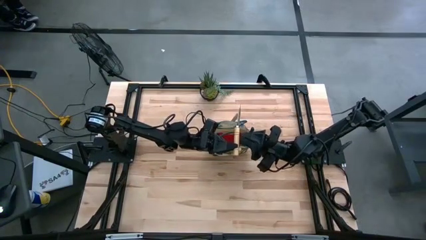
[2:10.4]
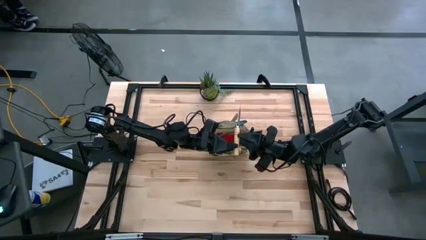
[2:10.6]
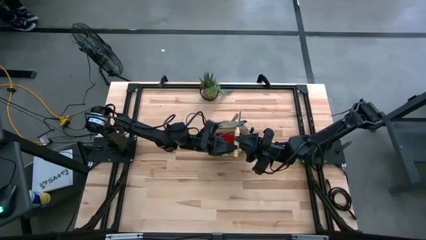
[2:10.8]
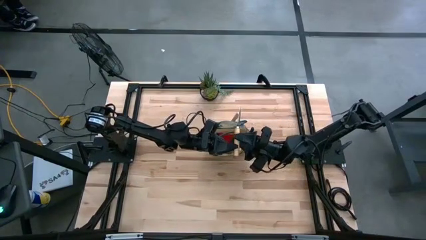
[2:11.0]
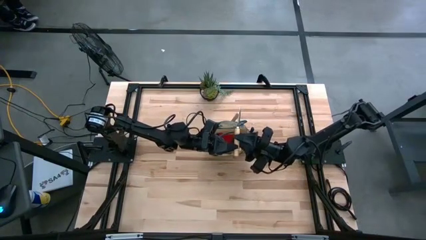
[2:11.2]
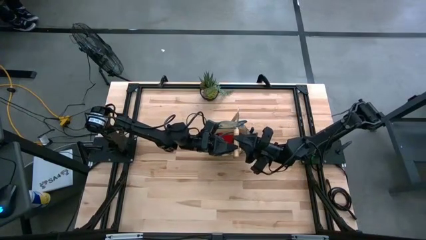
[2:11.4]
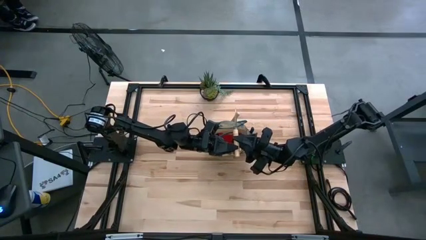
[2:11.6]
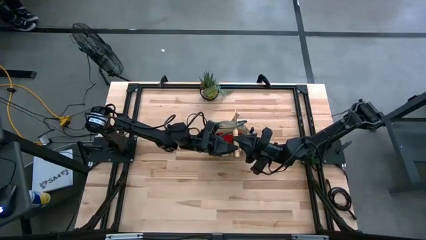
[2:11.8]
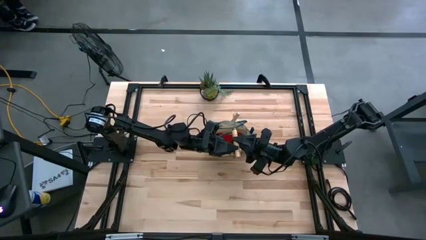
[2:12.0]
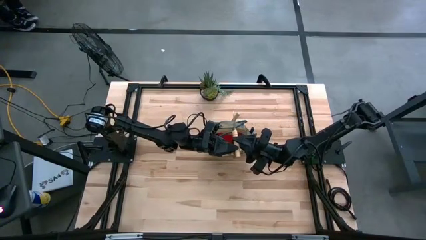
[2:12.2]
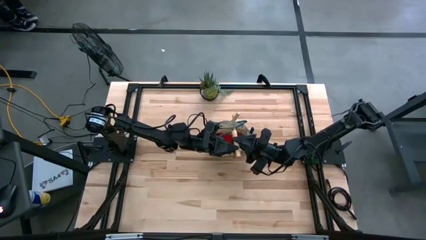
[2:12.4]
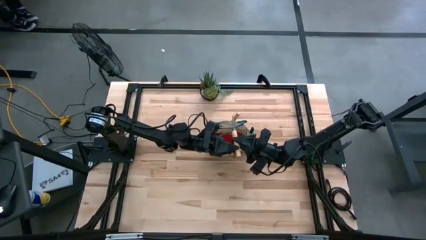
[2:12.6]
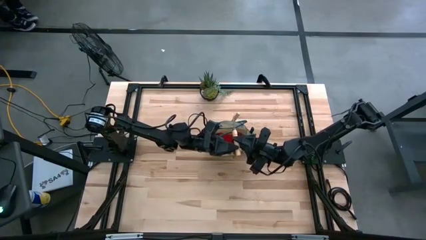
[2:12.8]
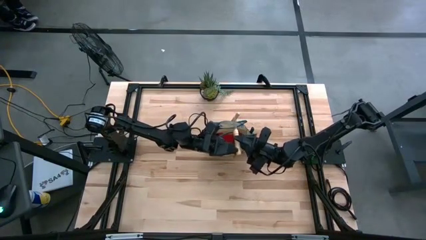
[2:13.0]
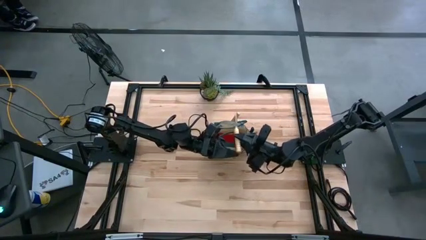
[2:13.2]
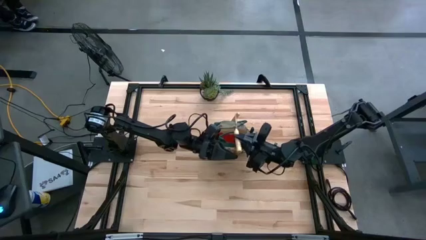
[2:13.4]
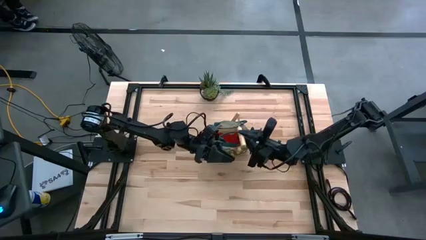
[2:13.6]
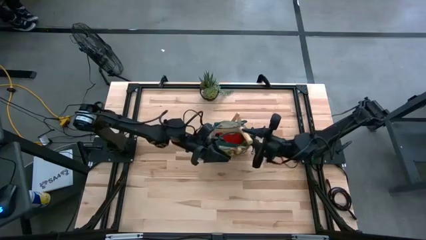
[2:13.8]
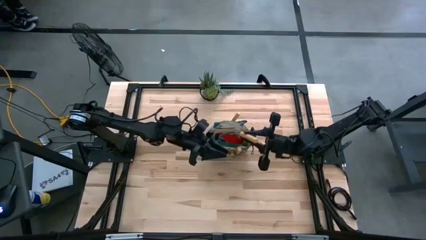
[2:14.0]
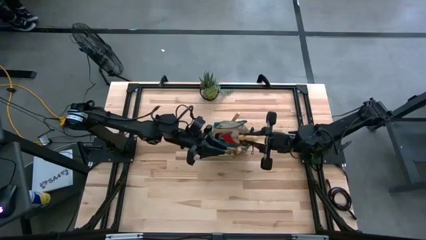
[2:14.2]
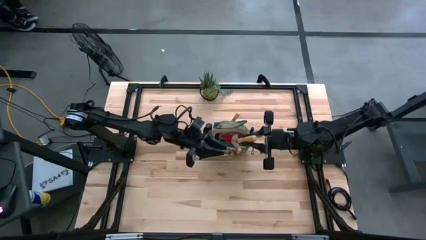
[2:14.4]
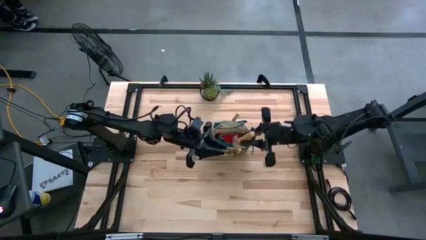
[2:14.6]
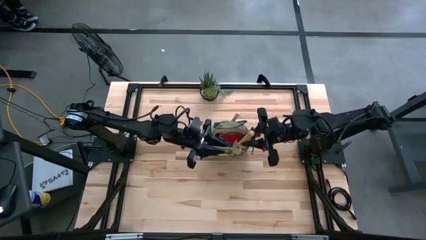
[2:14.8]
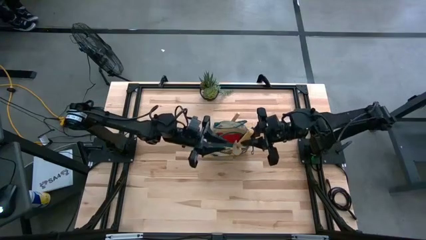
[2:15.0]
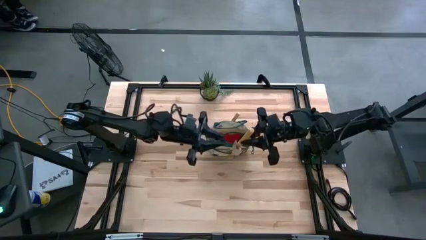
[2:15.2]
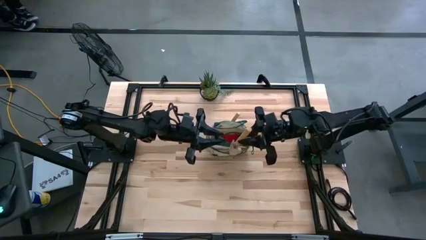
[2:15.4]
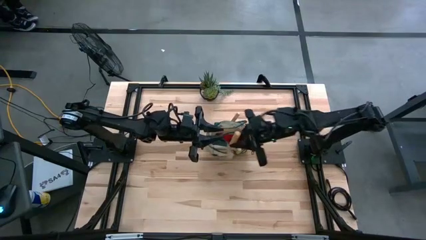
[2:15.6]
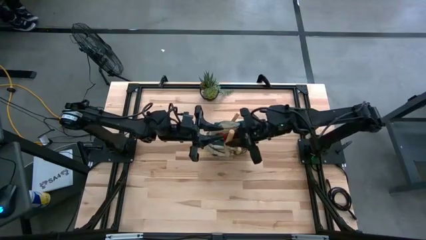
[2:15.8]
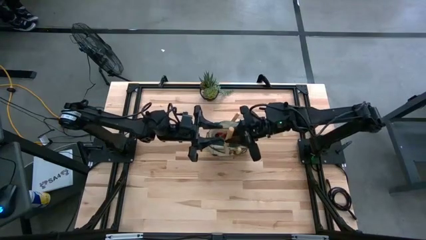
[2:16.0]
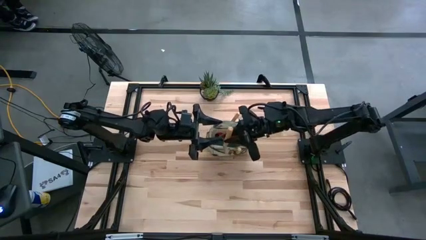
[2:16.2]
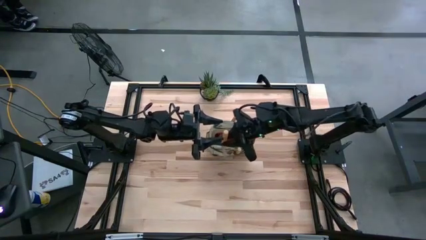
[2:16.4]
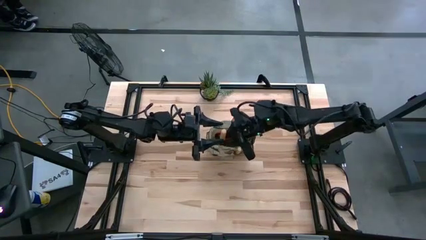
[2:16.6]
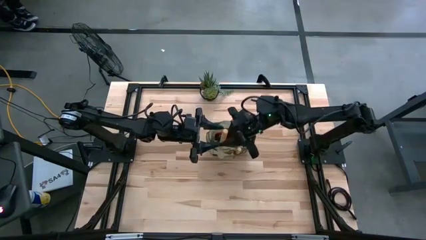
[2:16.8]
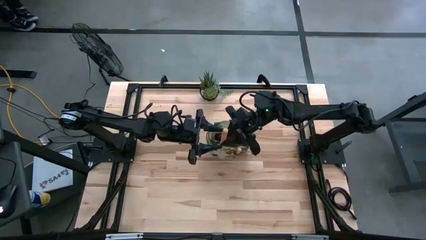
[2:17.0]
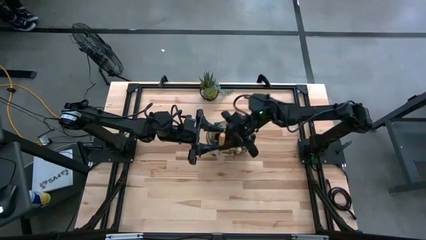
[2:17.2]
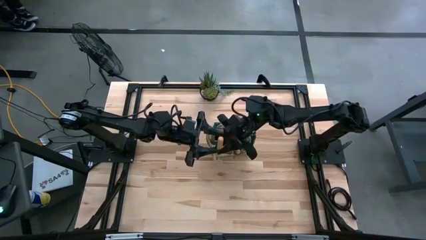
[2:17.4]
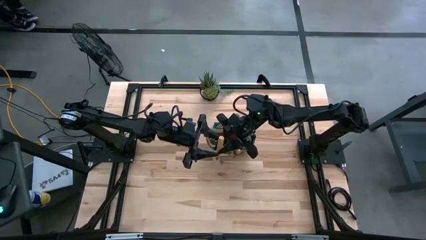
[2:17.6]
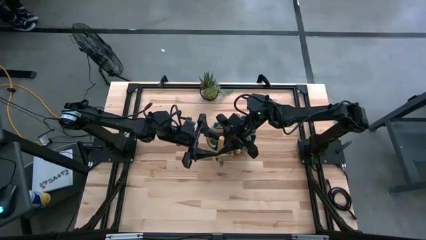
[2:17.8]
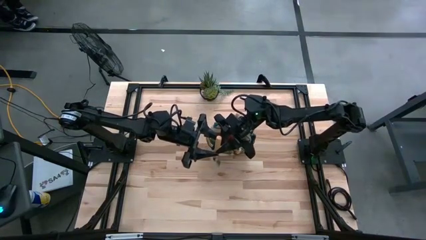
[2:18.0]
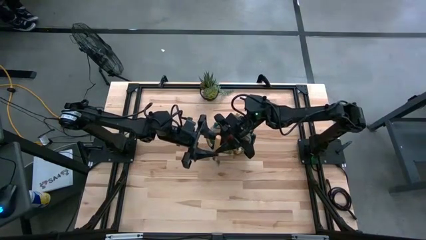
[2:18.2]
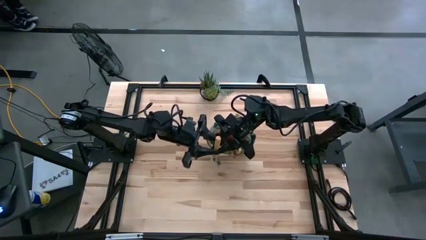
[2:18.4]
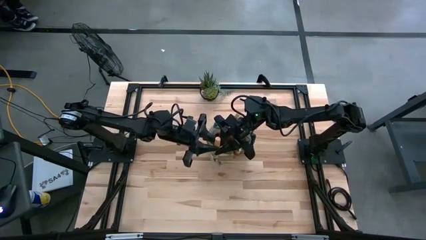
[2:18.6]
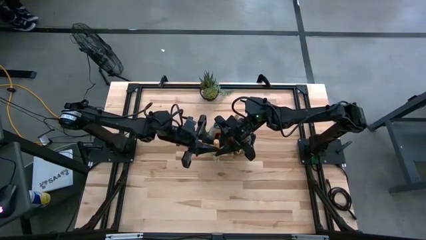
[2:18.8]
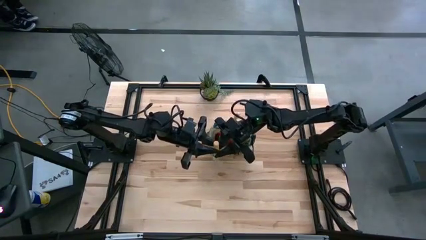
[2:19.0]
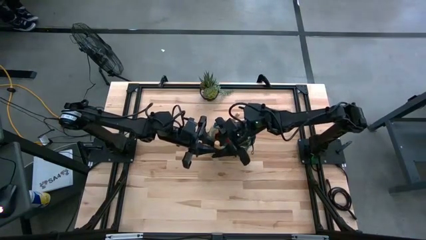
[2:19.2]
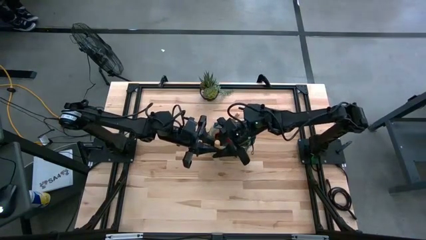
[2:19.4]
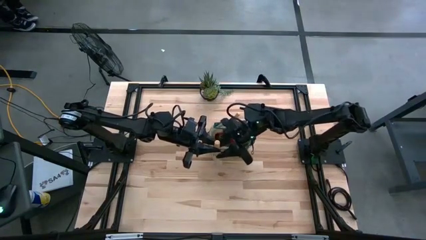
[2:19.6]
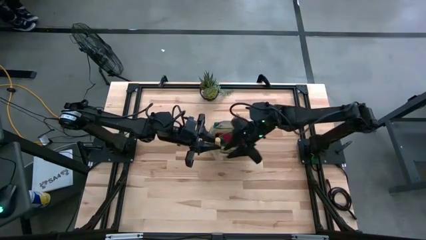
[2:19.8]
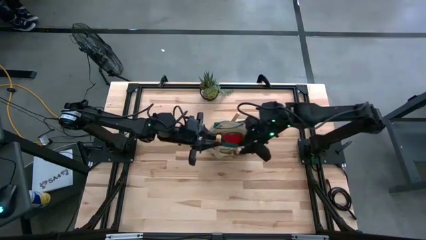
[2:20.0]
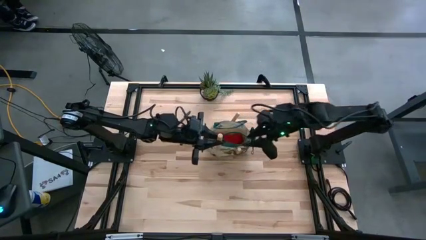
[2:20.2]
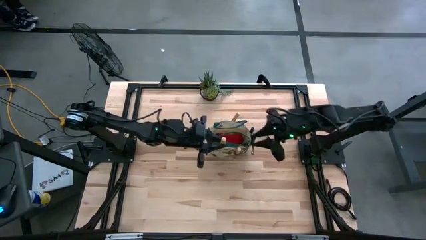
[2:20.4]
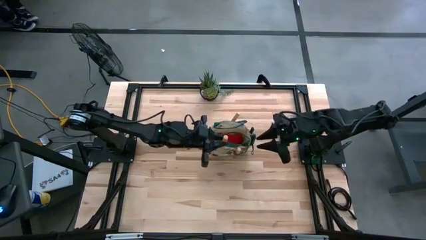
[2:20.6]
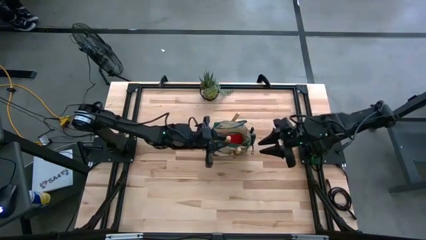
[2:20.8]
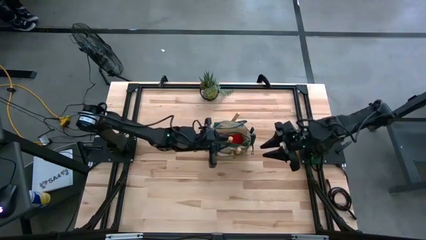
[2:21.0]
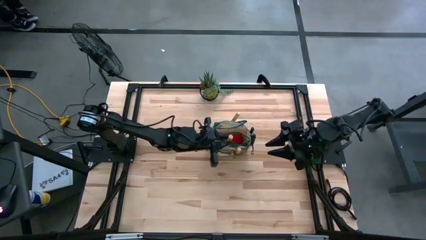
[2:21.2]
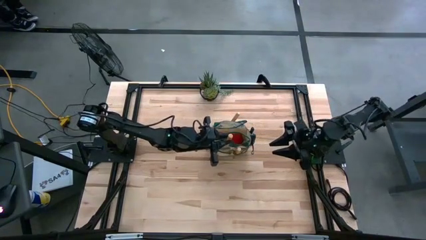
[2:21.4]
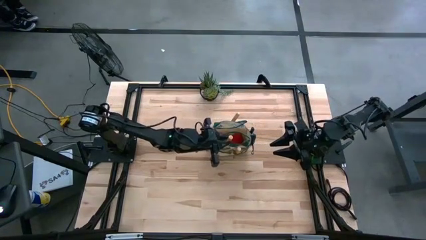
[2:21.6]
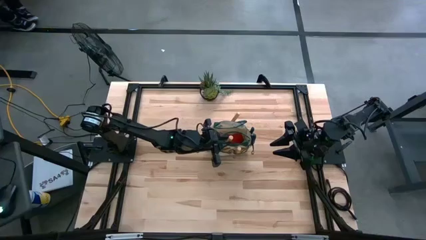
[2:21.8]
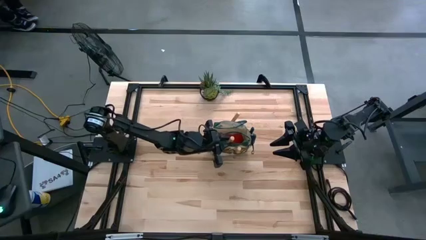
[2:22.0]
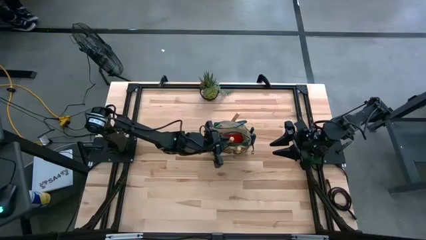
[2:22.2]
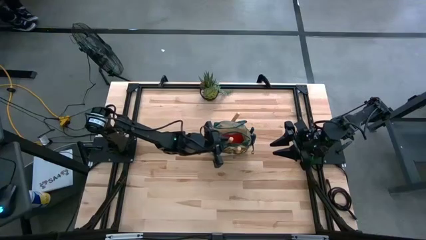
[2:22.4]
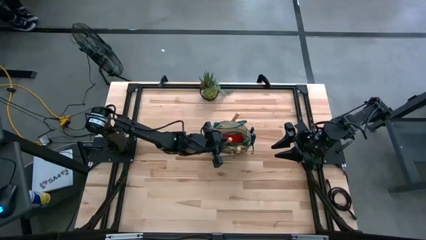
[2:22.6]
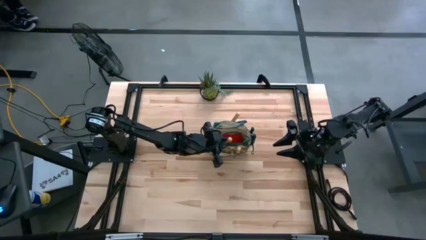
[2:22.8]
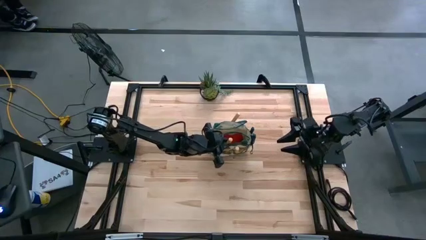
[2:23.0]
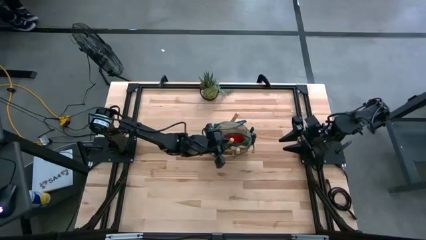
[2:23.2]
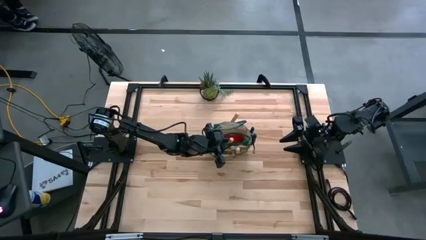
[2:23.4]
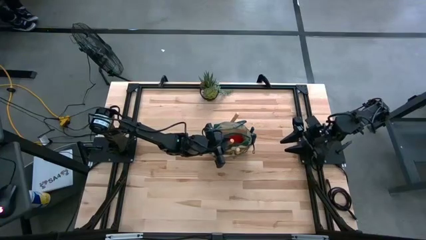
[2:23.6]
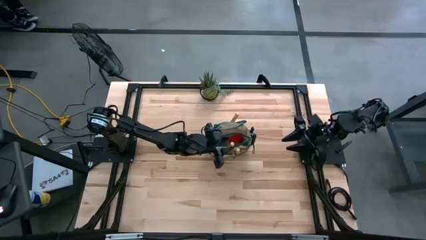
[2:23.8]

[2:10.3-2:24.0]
Task: Pick & Place Garden tools in Gardening bag
Put the light brown trowel into the light brown gardening bag

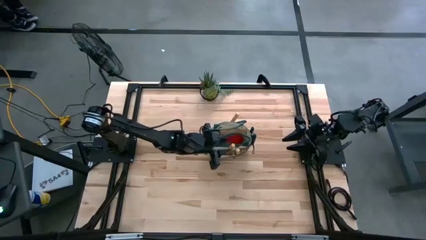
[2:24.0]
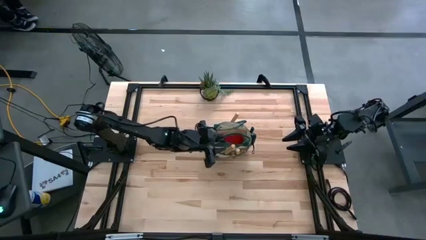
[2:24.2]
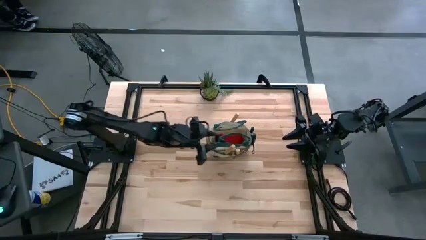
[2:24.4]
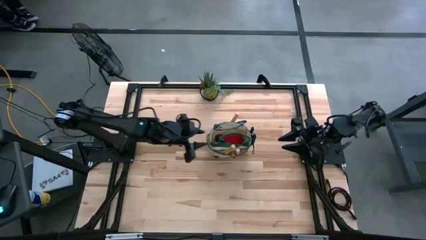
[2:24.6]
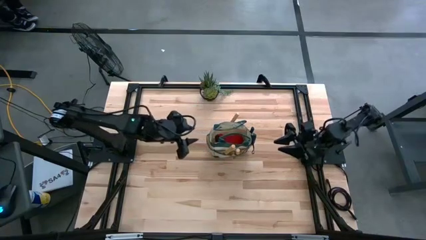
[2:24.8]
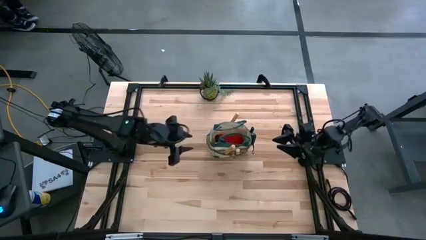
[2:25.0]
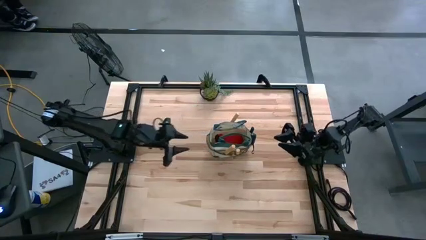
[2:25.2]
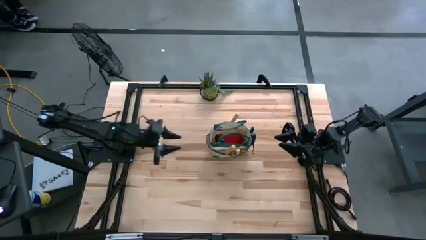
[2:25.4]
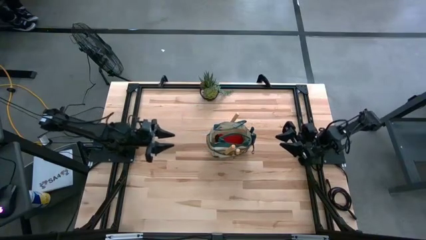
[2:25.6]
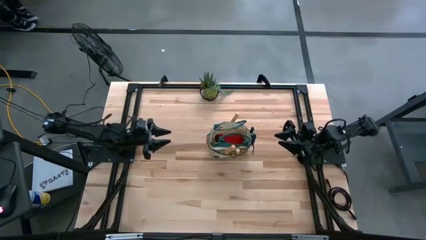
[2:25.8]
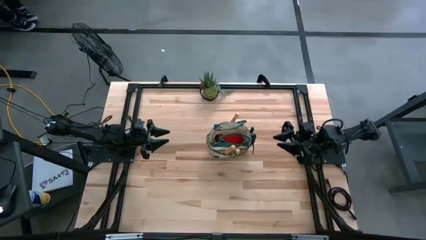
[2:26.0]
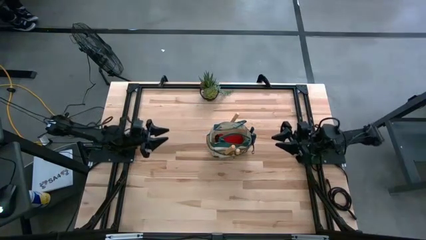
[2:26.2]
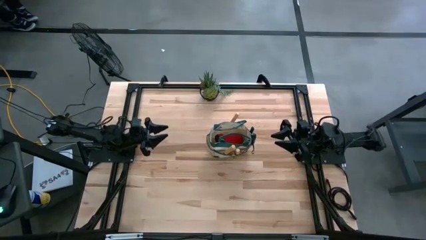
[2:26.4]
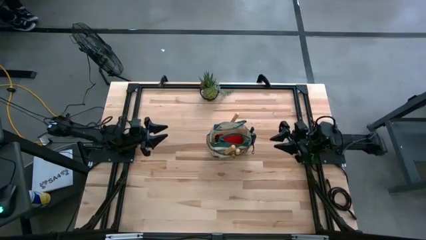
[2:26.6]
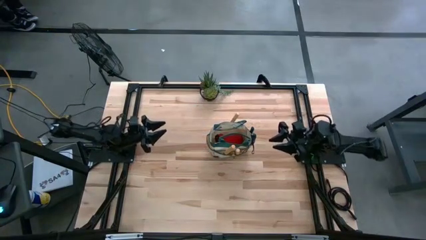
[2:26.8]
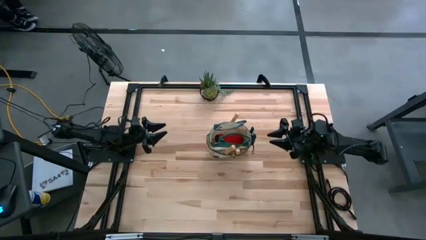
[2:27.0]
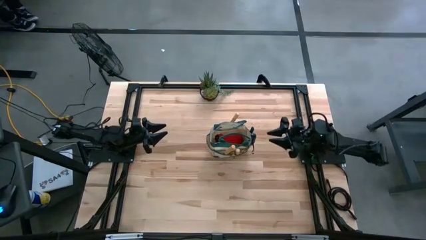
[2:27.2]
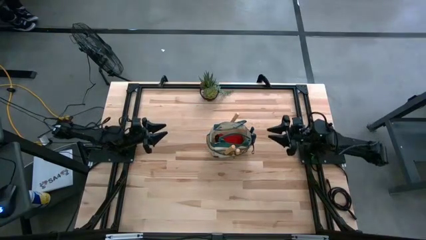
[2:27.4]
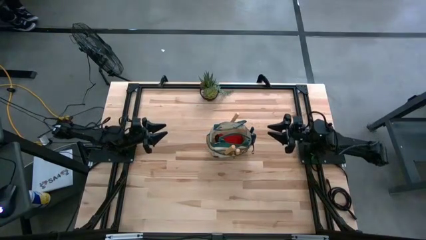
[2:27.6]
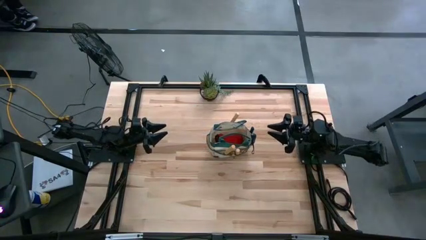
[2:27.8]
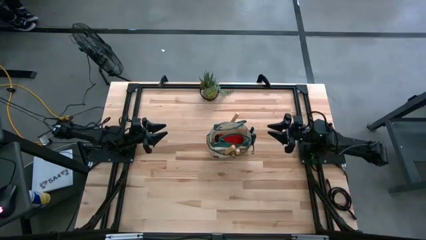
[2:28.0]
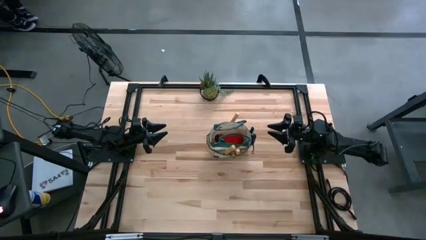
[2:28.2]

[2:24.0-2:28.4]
Return to Home Position
